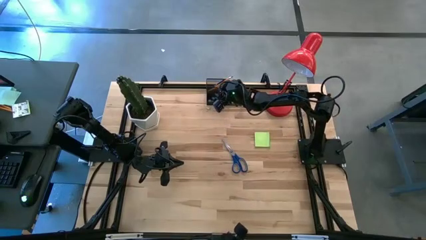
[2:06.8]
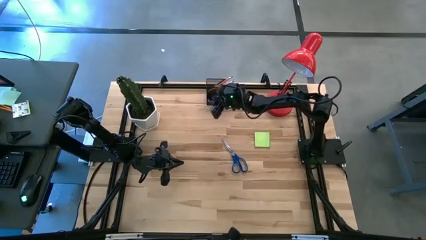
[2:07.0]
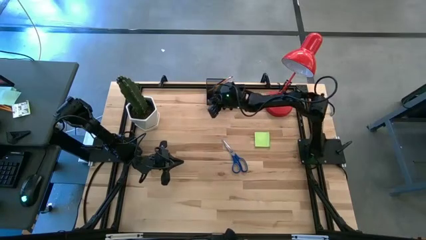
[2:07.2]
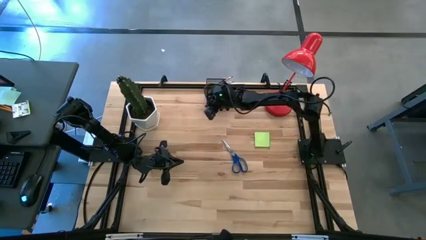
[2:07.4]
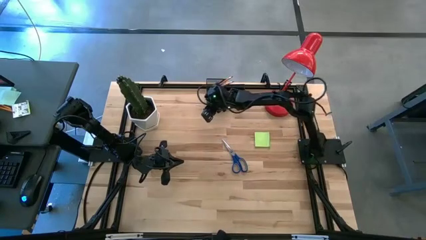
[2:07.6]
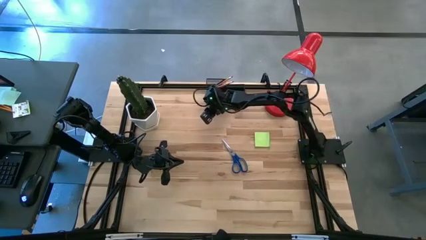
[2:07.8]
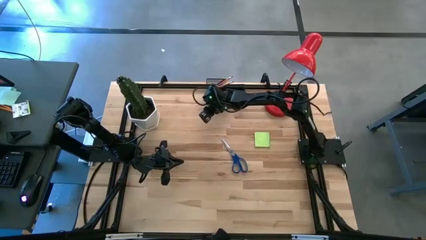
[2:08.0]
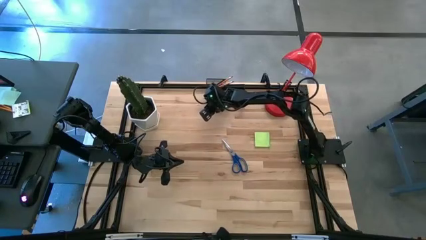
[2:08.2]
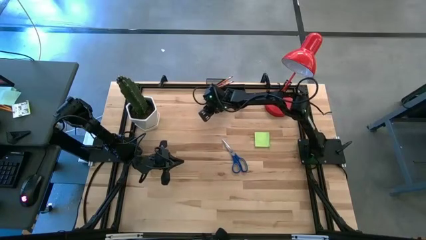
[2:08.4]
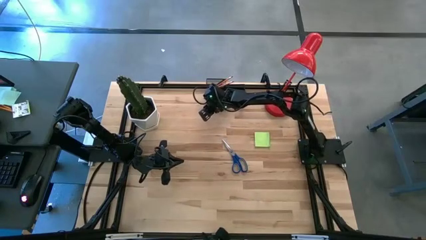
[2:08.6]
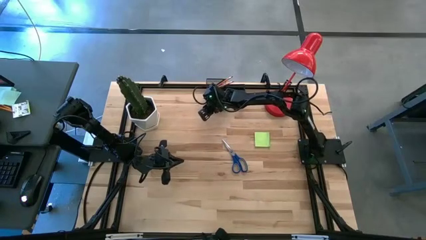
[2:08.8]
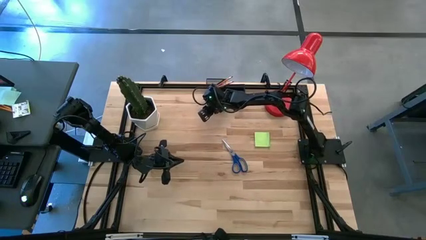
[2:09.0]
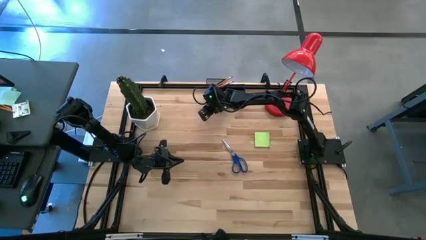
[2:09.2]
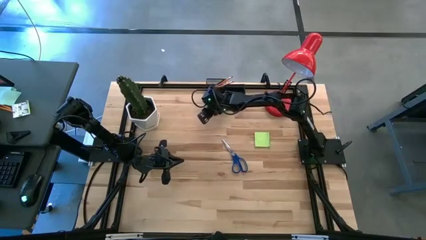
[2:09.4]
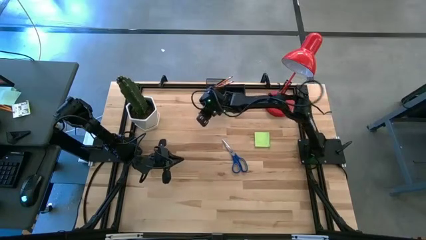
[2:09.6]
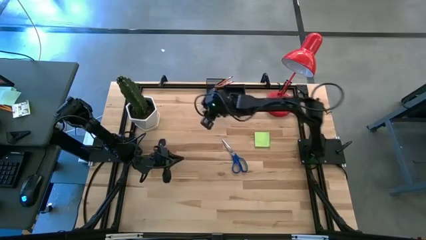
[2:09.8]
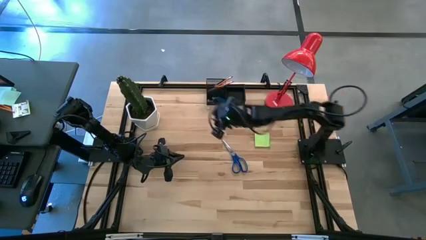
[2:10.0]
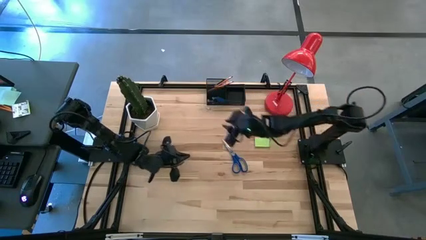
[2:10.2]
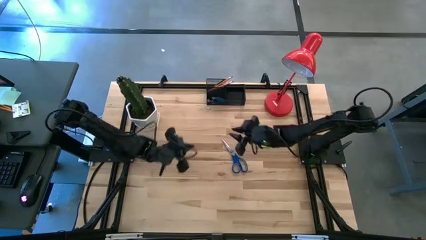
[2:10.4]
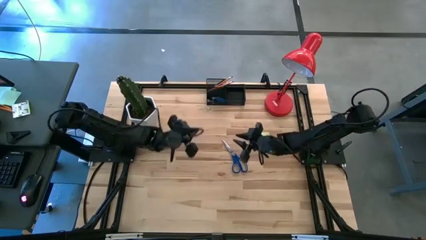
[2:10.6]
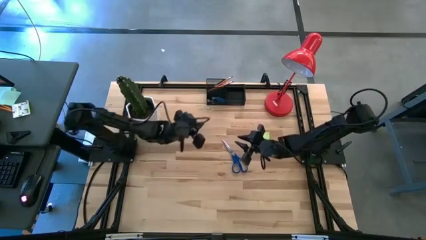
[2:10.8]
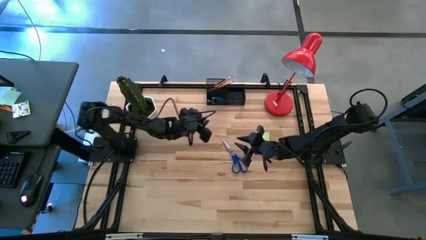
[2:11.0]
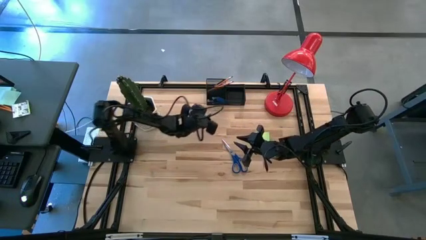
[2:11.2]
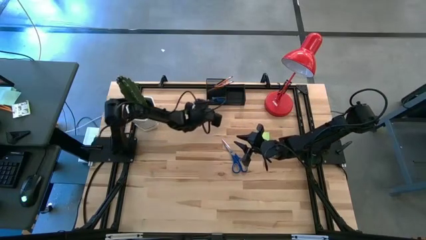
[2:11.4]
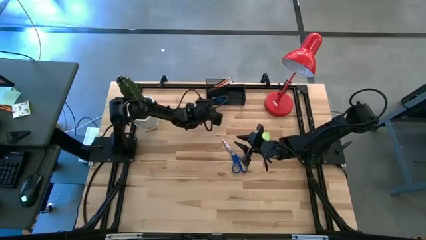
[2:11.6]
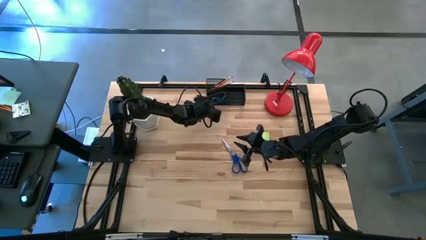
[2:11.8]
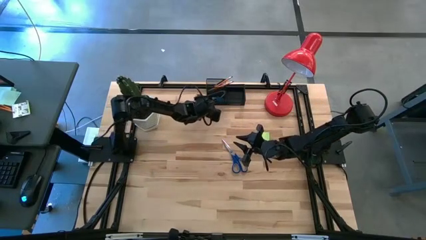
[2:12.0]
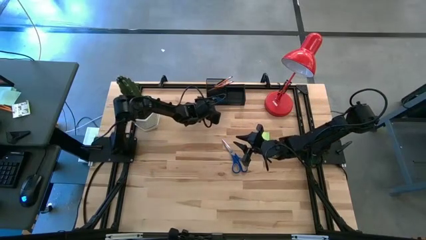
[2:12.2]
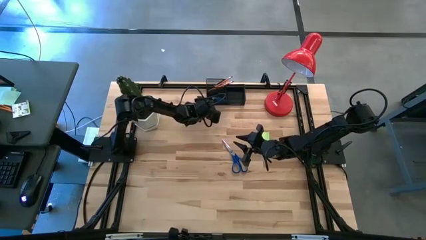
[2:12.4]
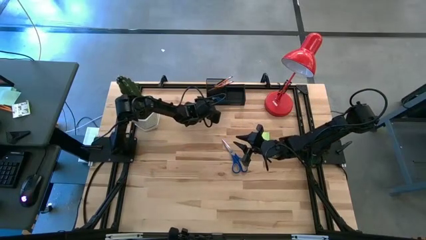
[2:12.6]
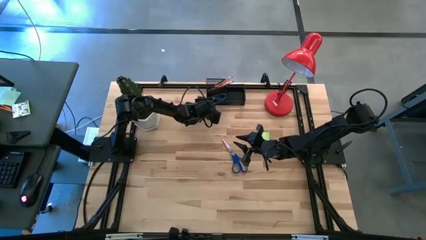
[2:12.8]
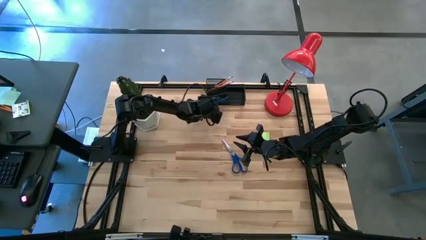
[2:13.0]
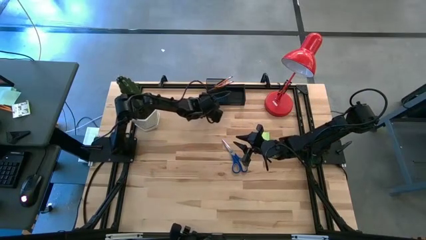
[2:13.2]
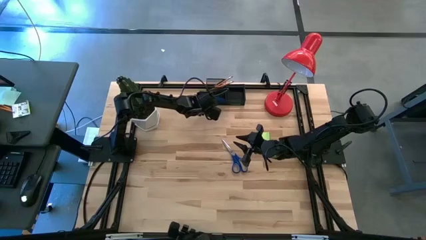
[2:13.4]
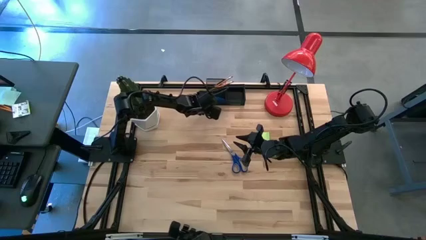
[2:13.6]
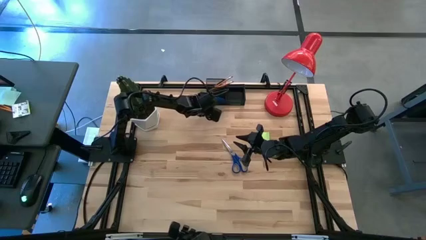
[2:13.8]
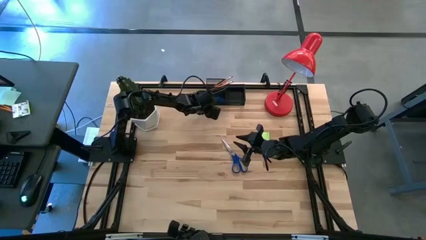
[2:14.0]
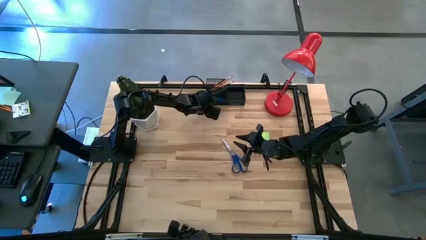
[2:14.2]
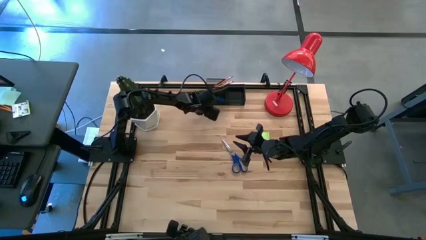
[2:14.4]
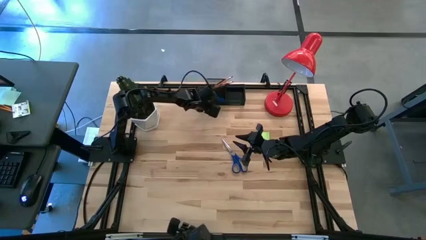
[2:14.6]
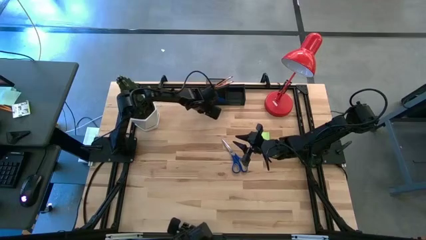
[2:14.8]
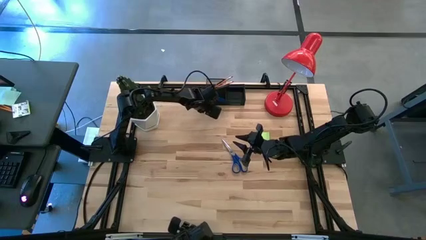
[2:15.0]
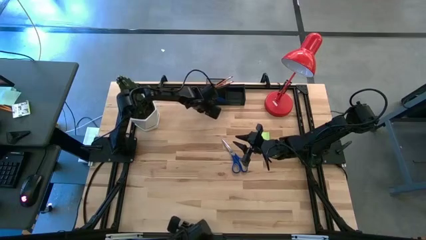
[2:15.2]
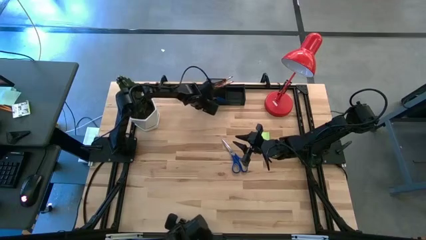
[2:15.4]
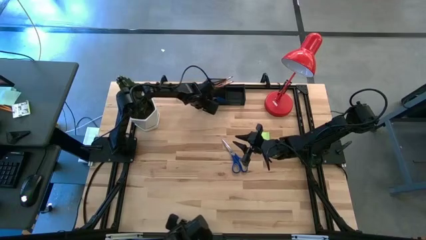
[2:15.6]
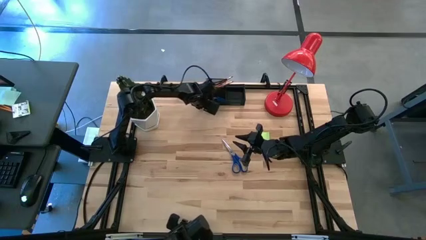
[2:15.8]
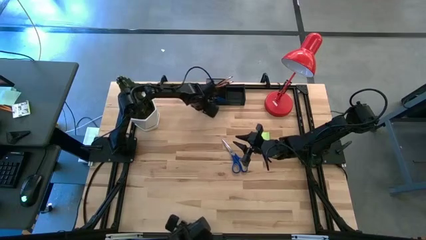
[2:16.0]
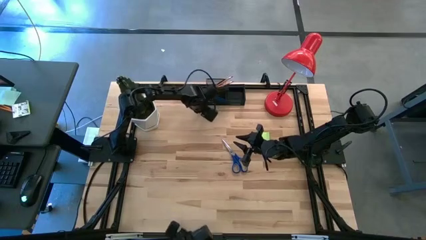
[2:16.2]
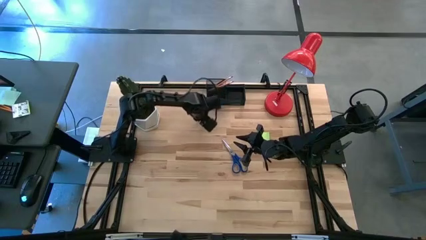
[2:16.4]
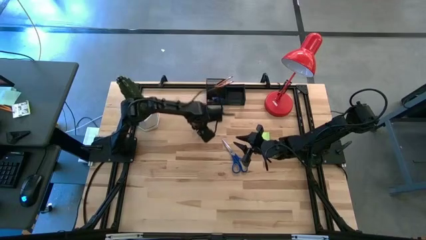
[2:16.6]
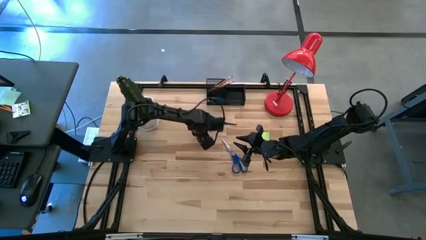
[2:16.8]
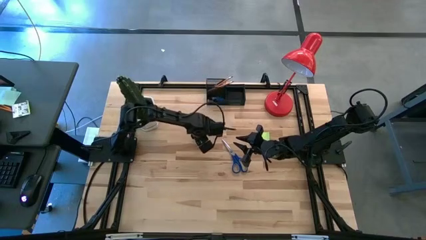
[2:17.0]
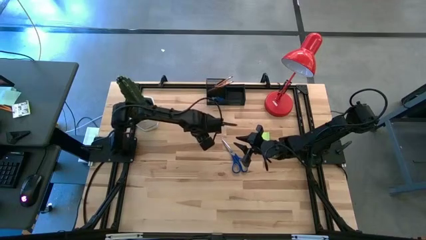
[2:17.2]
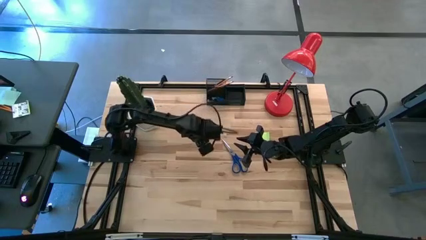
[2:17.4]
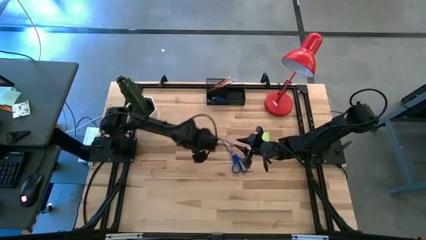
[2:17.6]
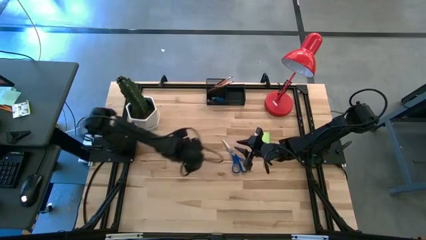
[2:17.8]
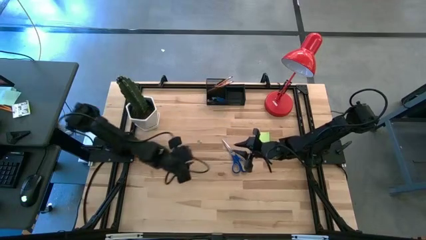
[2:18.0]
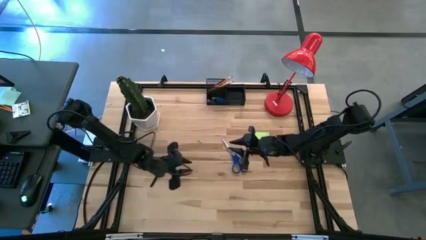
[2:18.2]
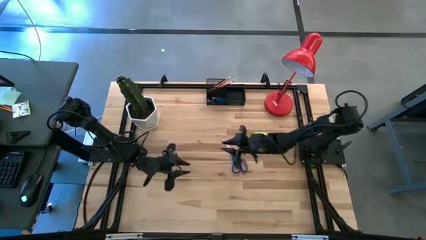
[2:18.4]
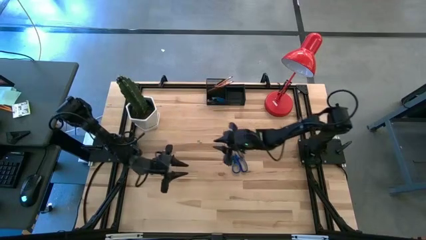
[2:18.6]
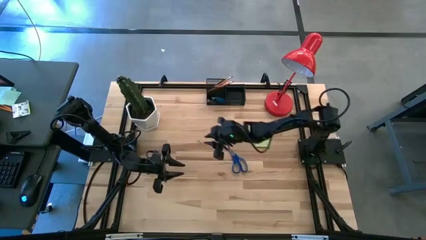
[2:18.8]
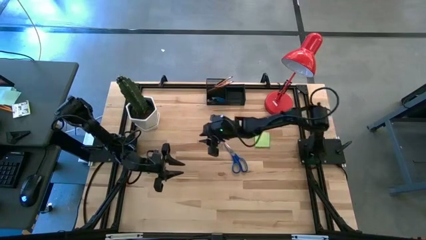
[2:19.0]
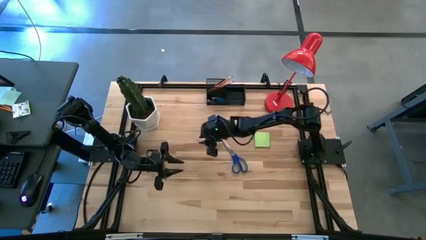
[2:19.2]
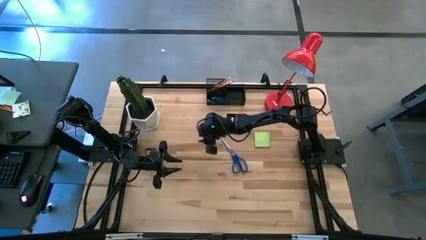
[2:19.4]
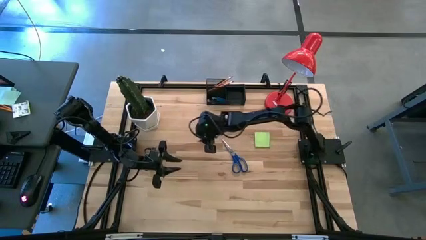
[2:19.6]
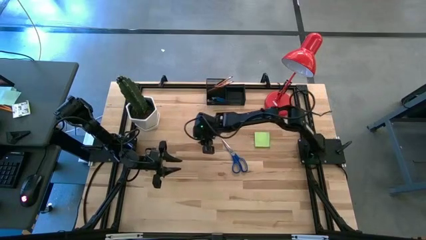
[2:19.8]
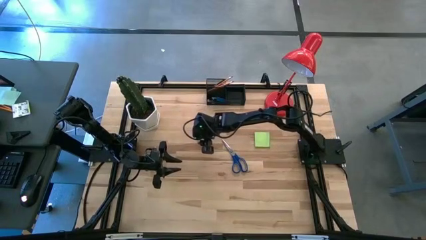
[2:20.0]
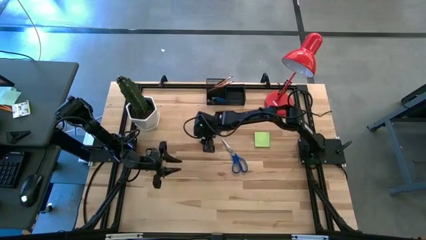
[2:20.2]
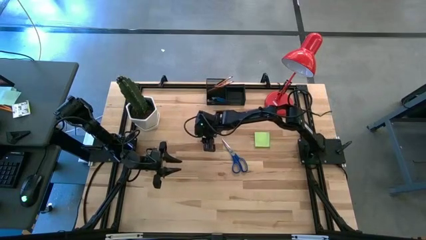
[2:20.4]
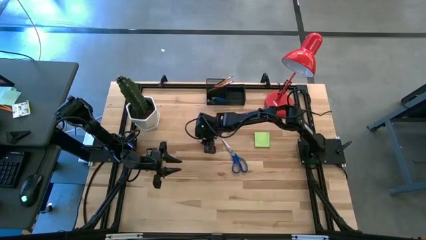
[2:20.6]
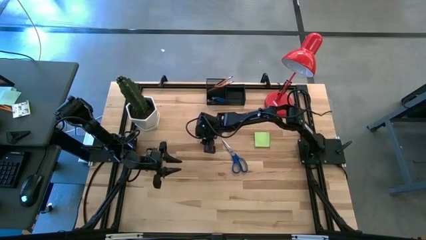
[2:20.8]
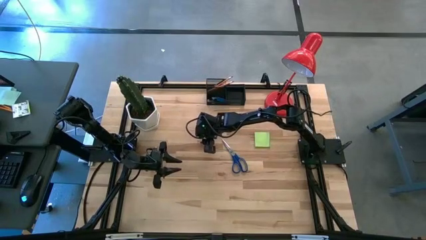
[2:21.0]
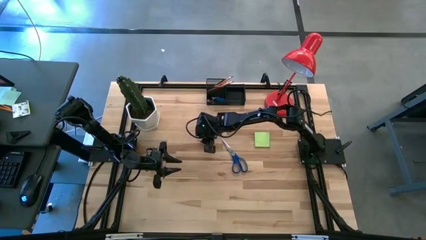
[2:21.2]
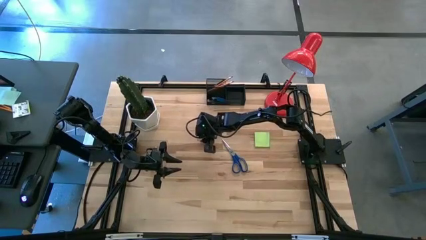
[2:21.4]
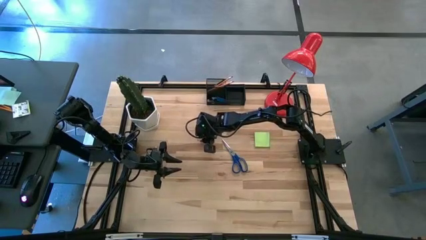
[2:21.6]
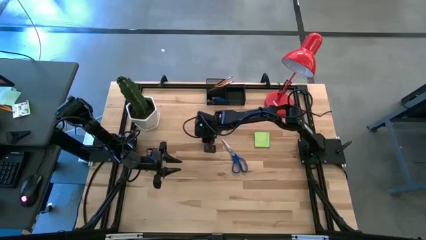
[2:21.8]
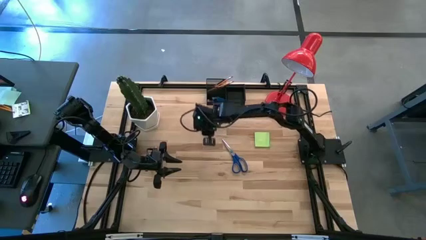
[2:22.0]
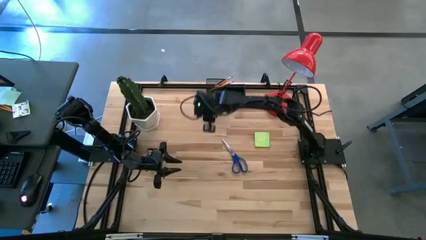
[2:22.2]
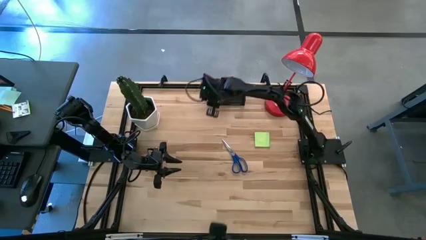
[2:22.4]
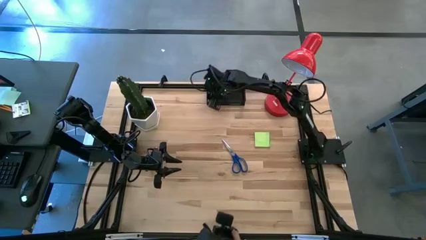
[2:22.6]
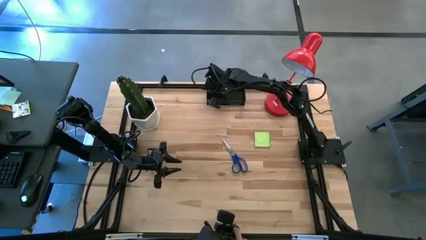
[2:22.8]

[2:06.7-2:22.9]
Task: Pick and place office supplies into organizer
Put the yellow binder clip into the bottom left section of the desk organizer
